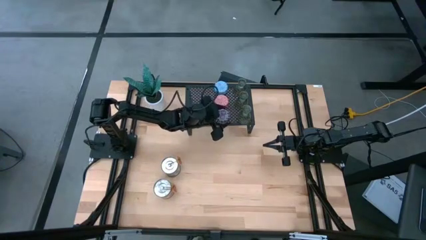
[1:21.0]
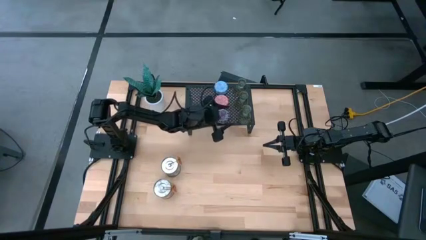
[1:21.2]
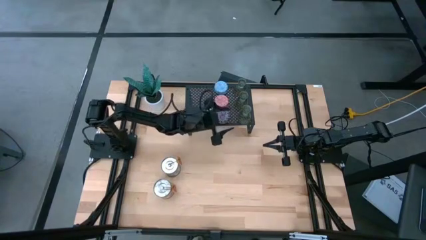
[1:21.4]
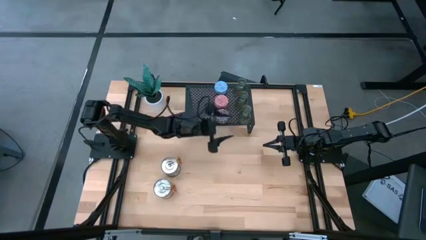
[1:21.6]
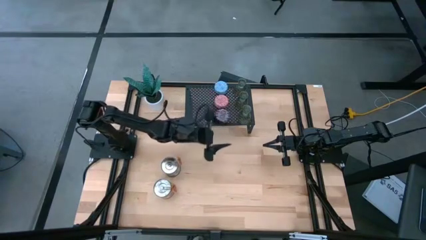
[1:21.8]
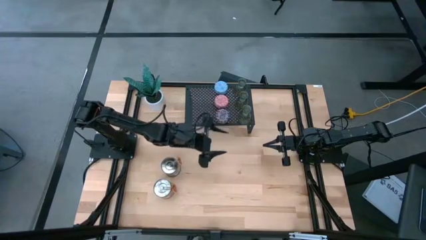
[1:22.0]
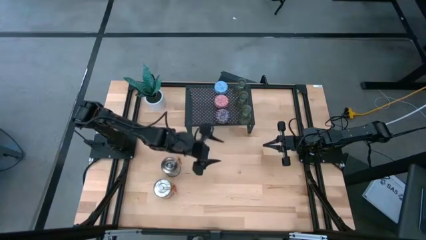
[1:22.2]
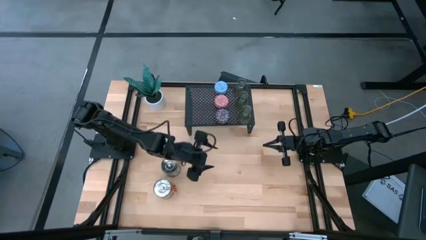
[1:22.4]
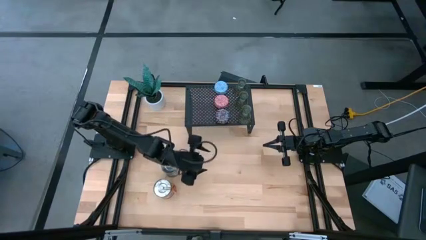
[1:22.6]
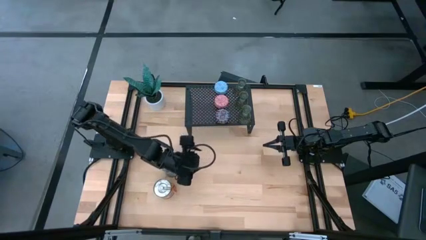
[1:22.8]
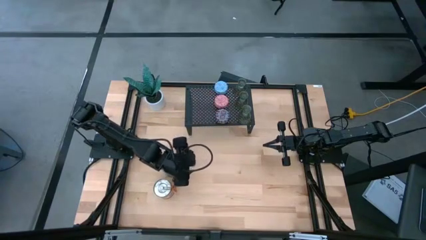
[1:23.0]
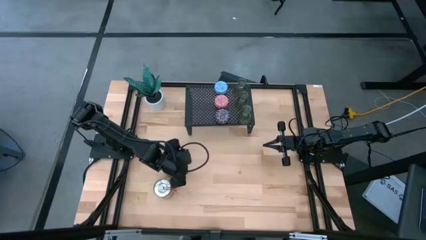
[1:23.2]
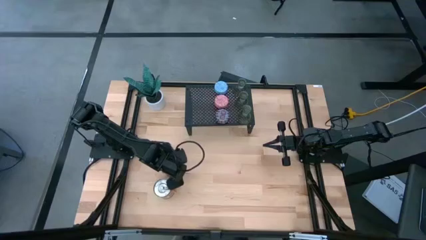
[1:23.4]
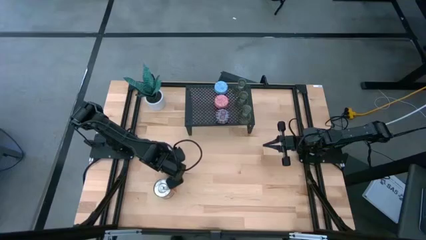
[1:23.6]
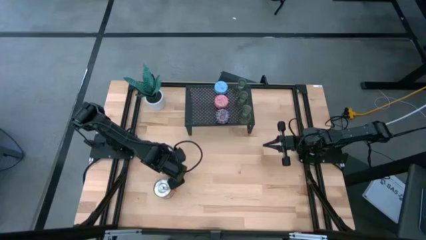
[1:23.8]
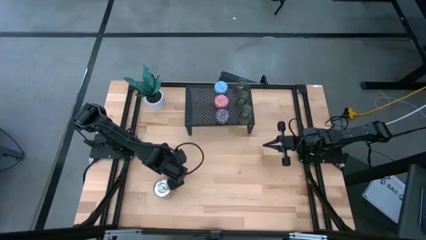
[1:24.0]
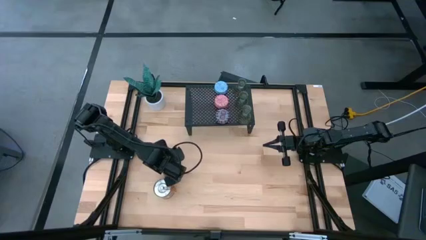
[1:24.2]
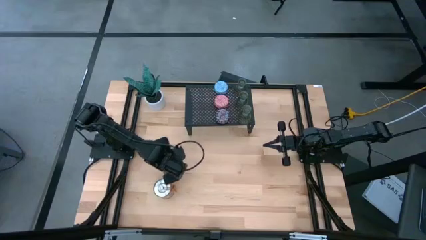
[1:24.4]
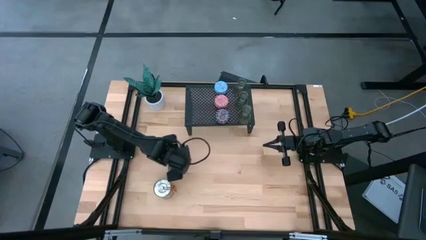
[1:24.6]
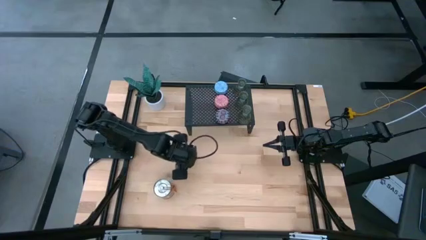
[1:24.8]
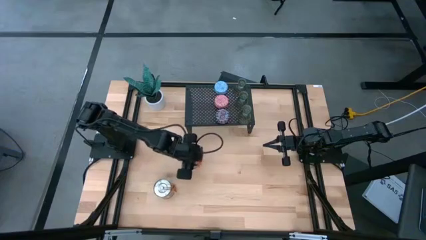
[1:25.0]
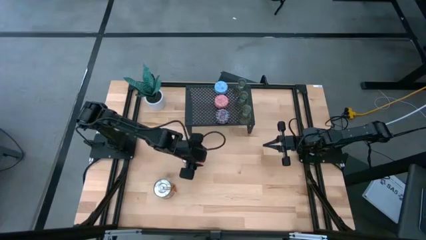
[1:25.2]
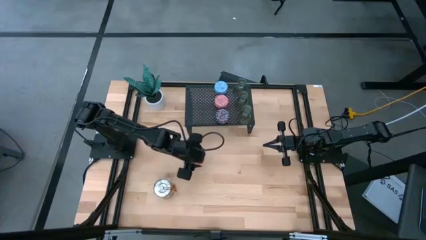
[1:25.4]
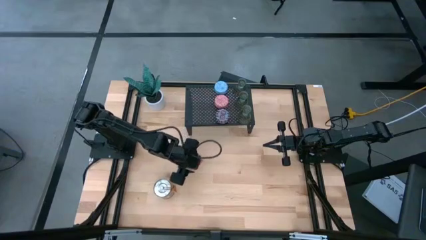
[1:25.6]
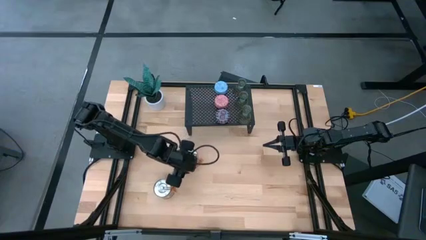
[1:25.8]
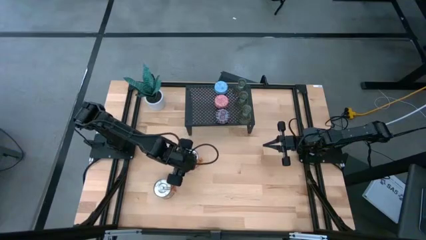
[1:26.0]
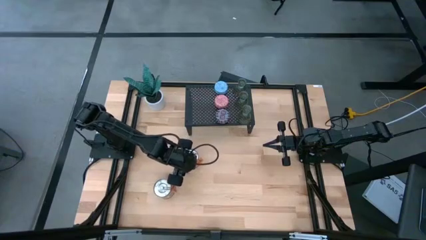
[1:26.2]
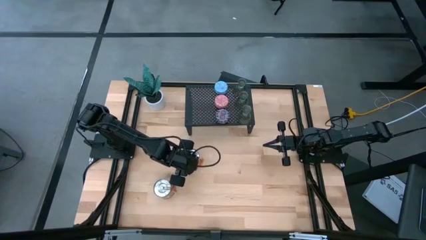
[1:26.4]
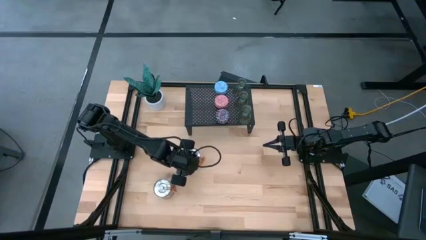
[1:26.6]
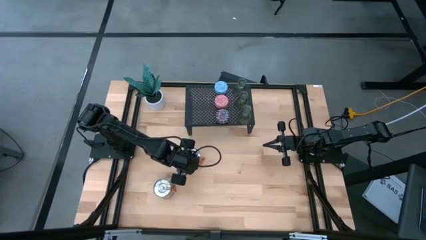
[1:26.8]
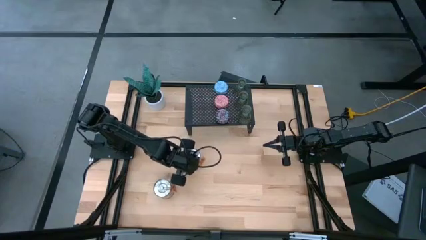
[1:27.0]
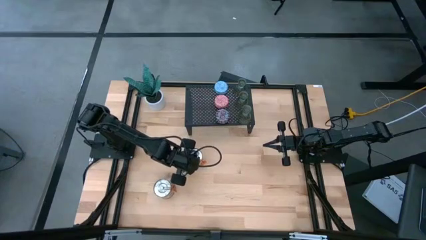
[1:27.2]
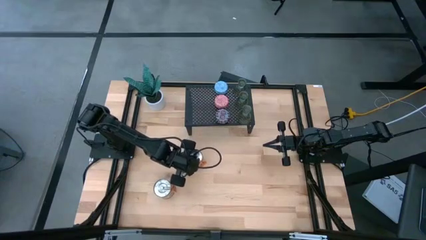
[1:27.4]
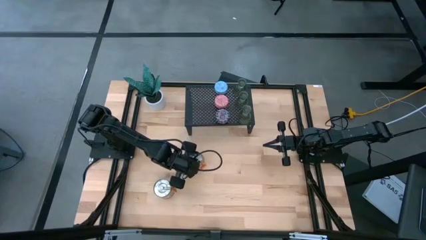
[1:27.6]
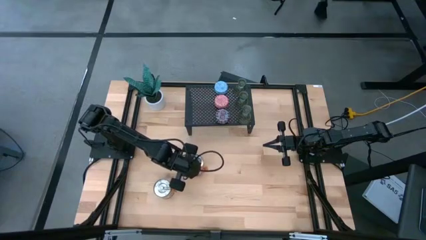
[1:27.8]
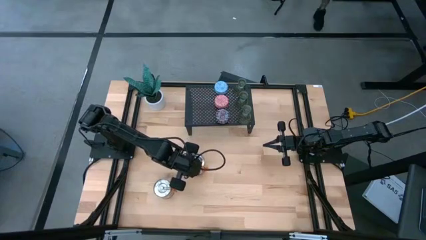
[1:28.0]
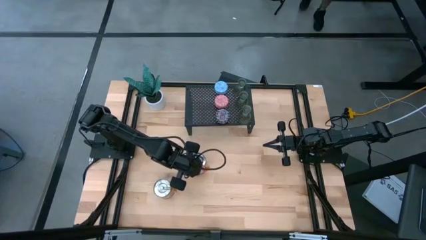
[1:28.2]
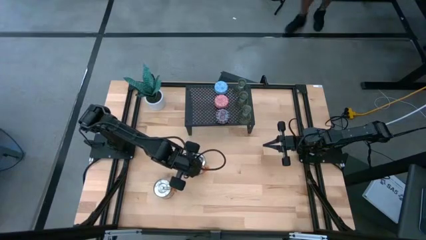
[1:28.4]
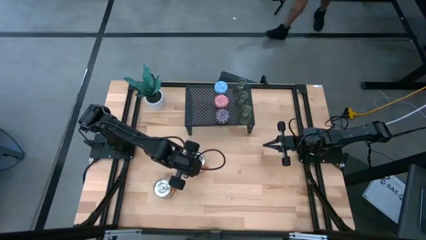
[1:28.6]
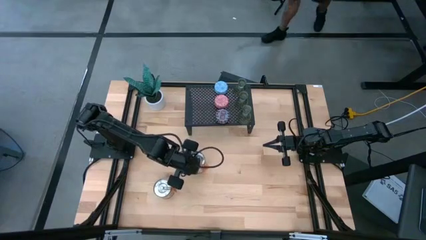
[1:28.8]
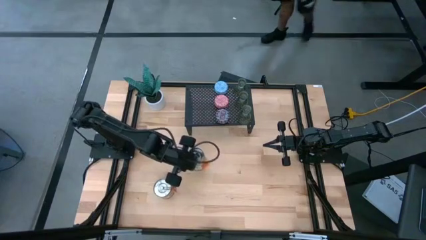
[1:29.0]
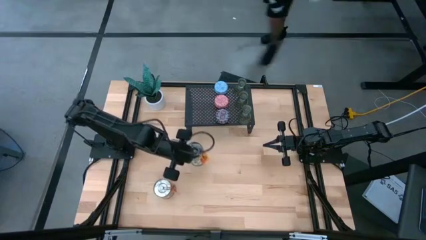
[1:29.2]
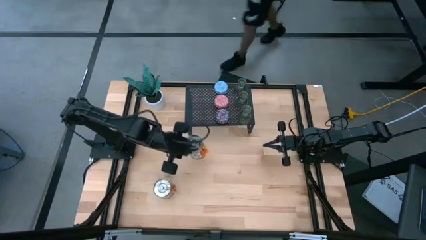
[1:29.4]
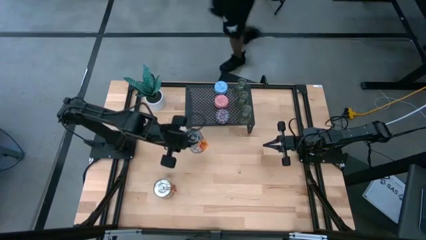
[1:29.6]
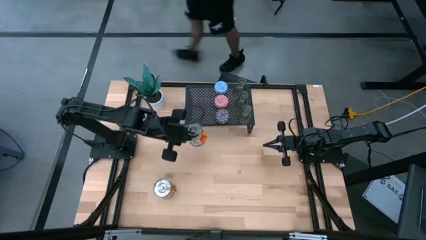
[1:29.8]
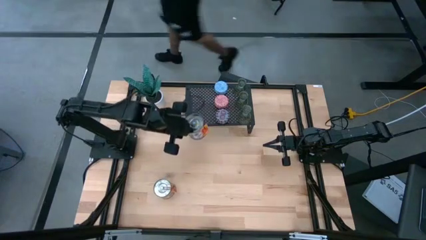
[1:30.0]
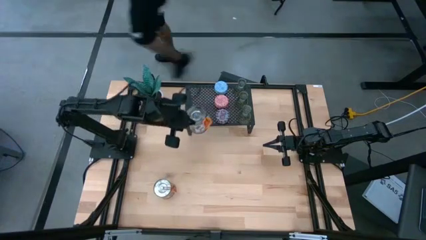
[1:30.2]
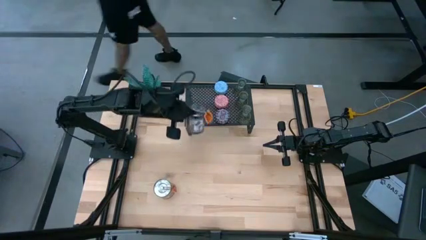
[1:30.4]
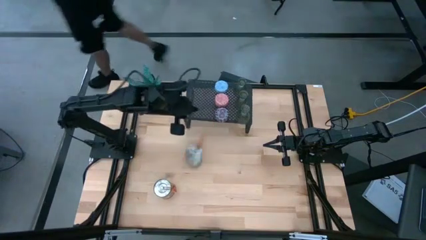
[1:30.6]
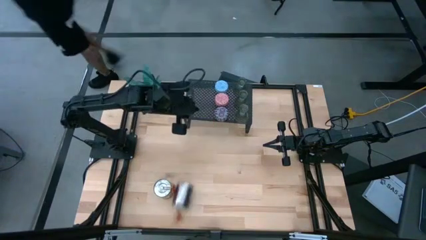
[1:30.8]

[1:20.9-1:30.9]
Task: Pick & Place candle stick holders
Put the top scented candle can on the shelf
